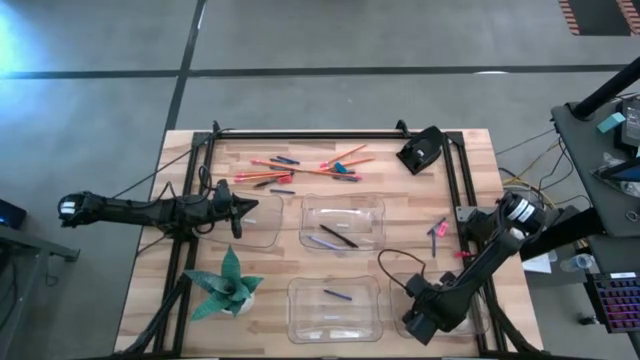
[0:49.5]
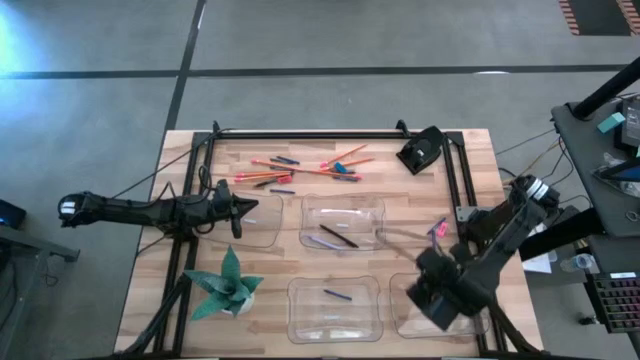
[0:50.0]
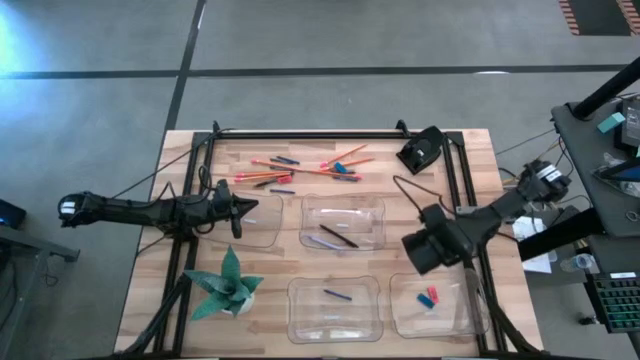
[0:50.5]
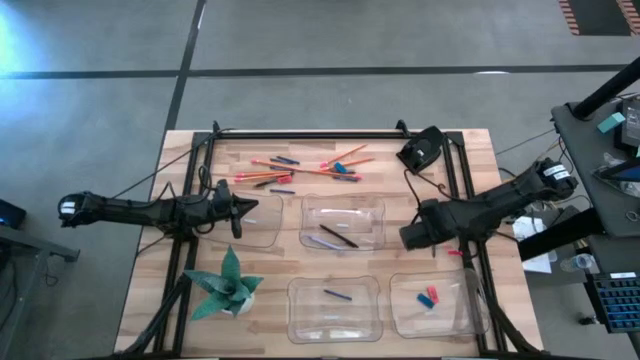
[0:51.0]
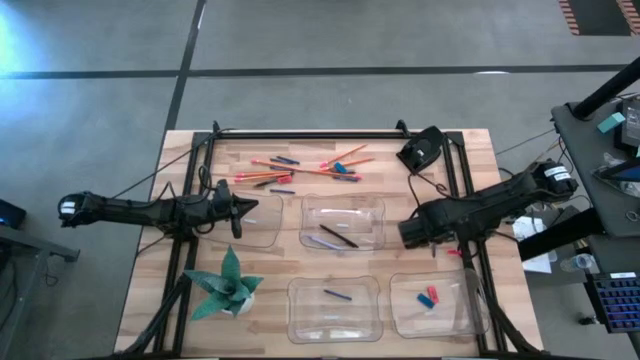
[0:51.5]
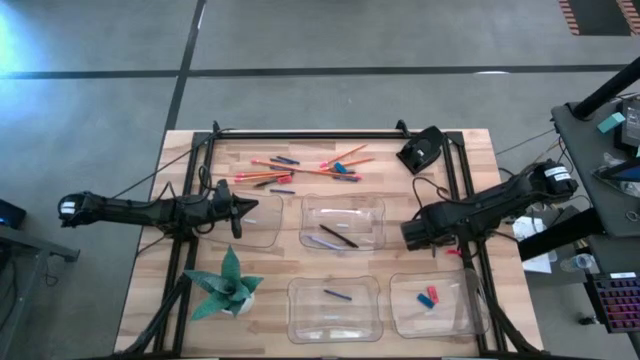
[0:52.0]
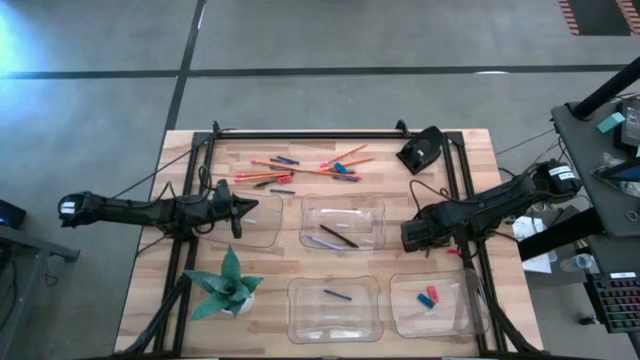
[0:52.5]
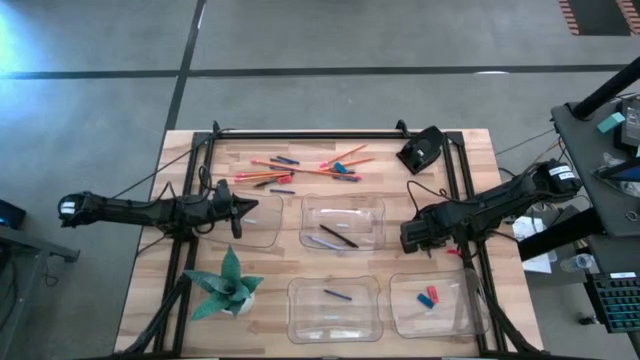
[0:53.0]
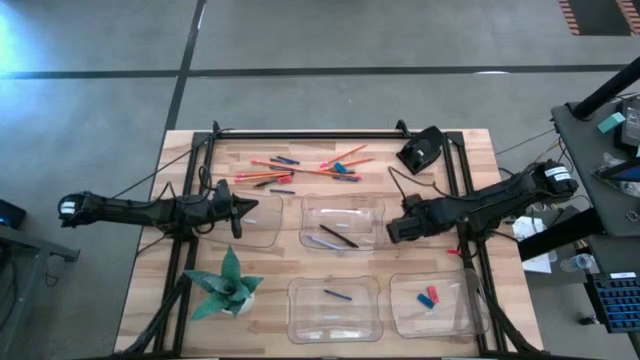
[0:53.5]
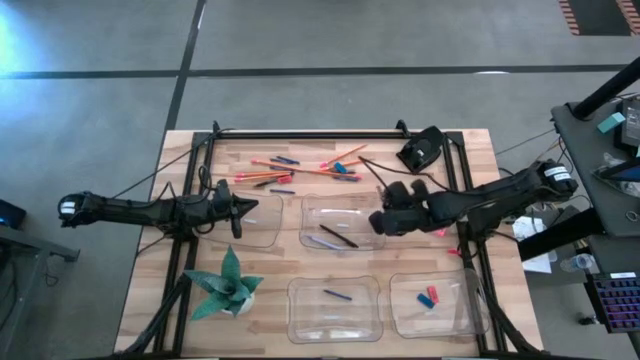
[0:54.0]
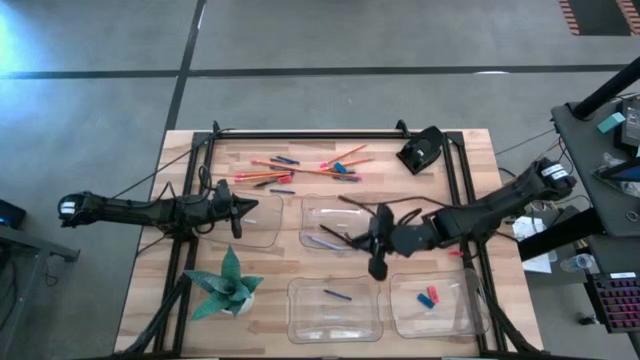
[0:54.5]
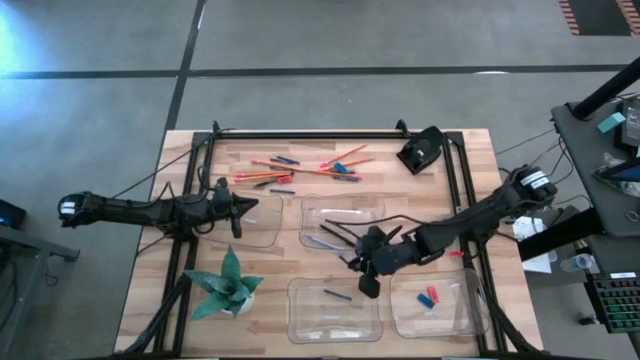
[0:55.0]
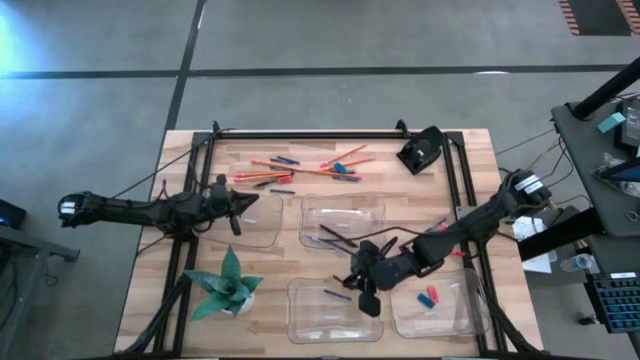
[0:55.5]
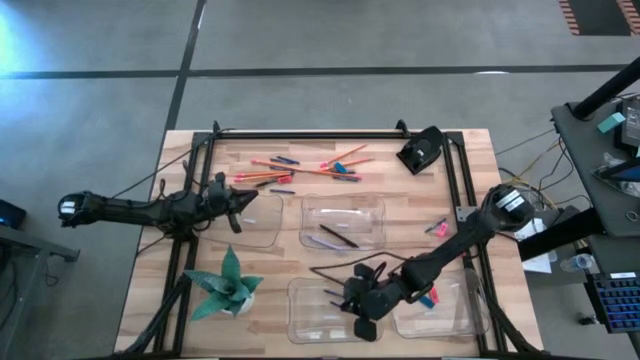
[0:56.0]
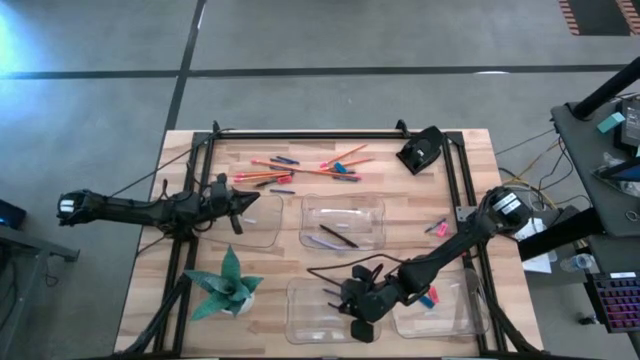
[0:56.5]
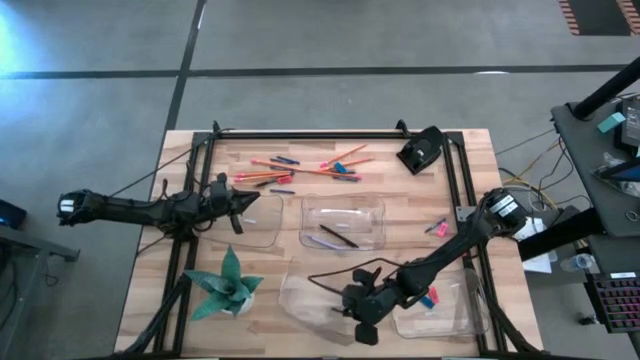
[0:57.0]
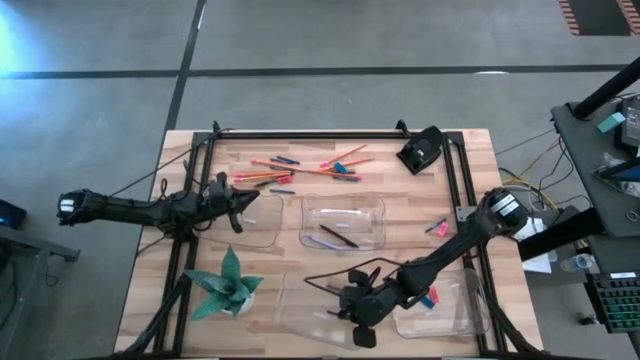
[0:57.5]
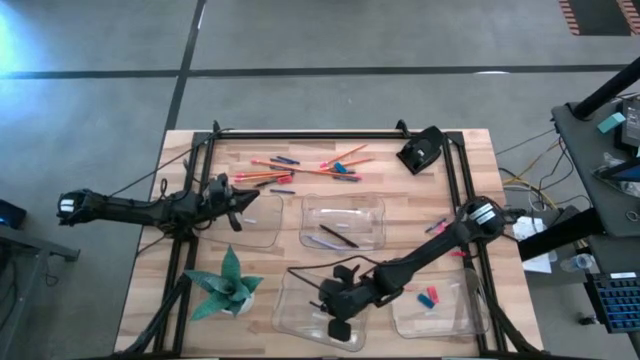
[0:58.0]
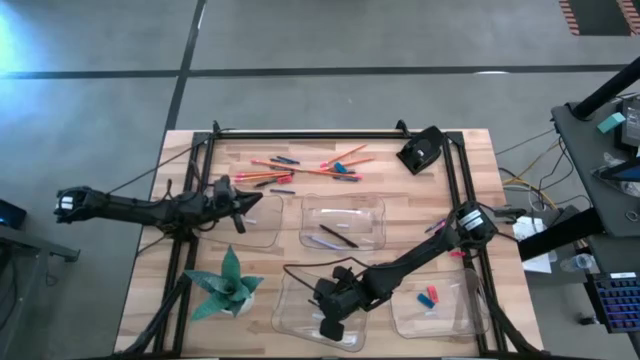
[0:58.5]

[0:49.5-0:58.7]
Task: Sort crayons/erasers/pens/pencils in bins
Put the blue crayon into the bottom left transparent bin

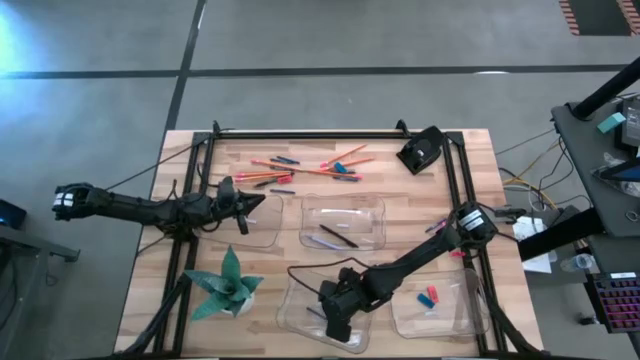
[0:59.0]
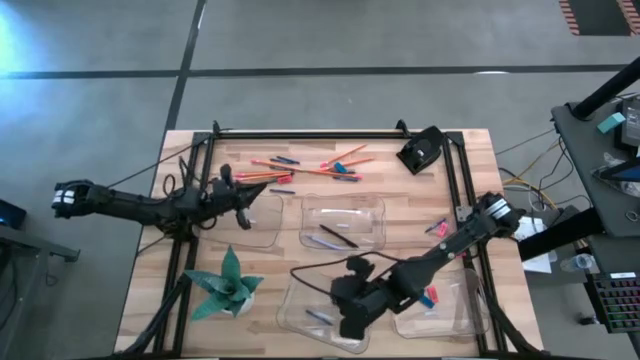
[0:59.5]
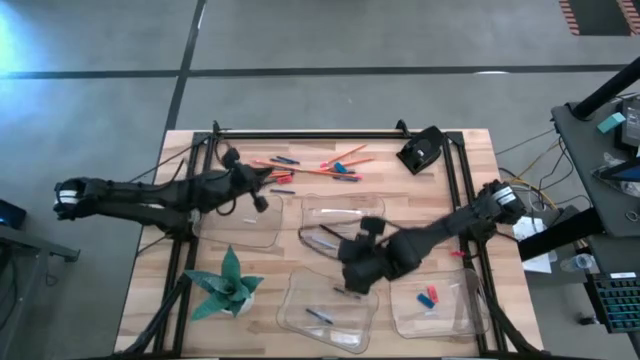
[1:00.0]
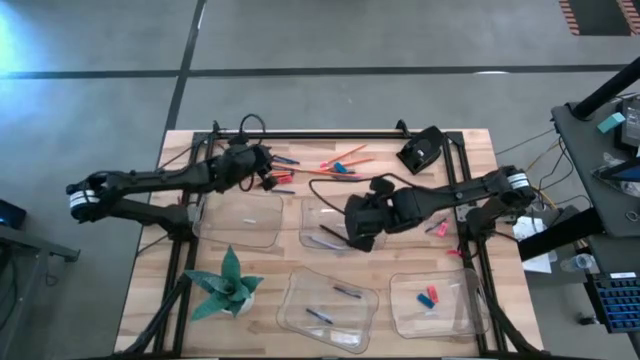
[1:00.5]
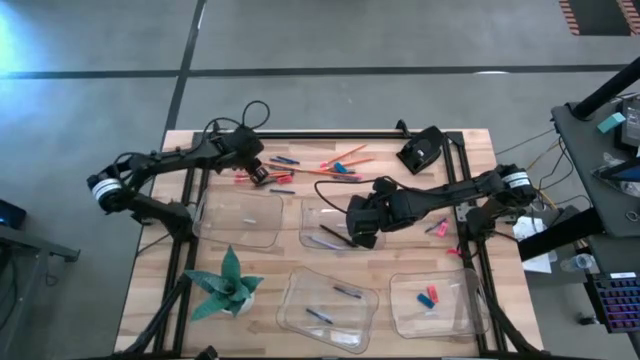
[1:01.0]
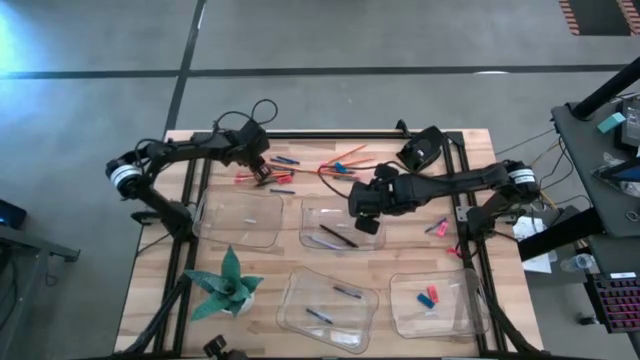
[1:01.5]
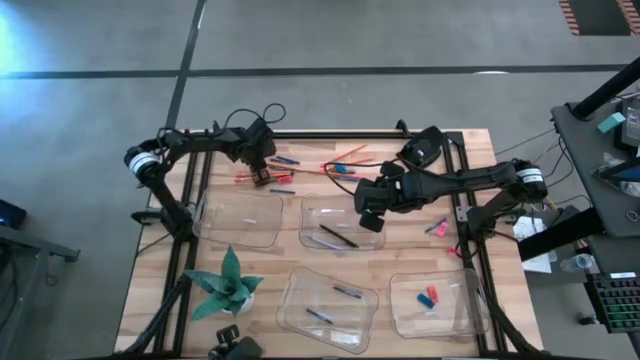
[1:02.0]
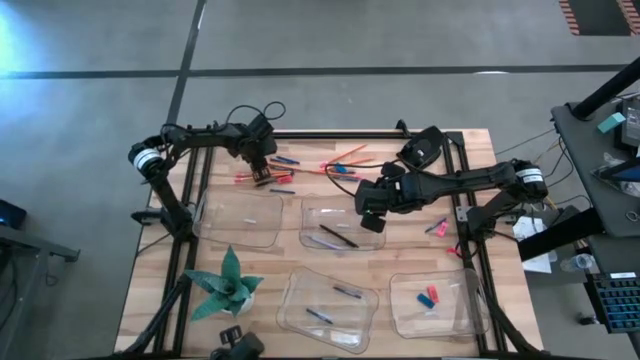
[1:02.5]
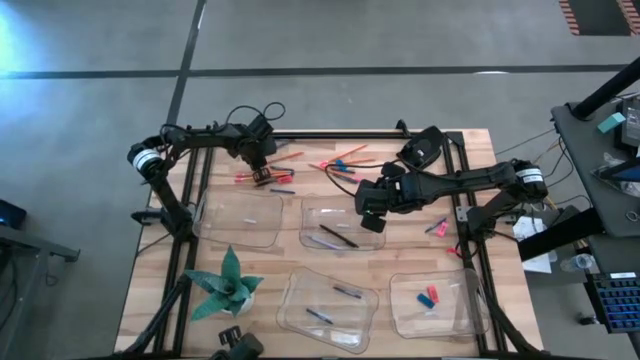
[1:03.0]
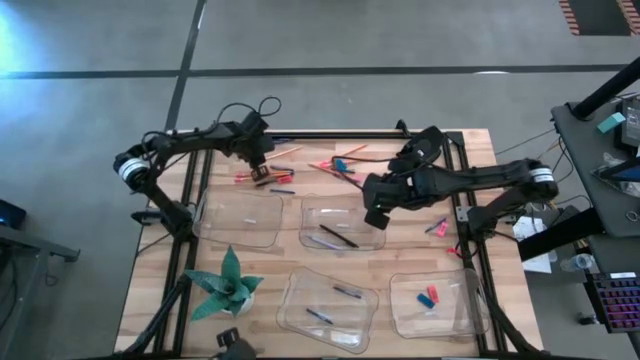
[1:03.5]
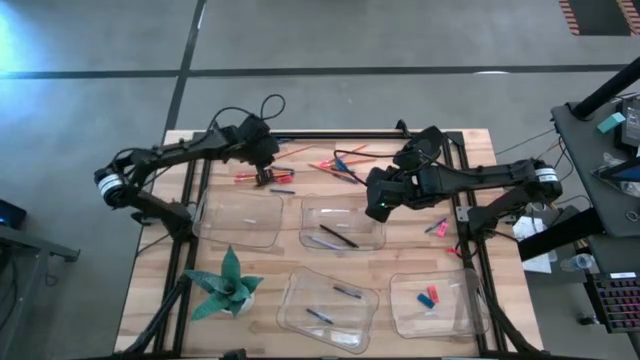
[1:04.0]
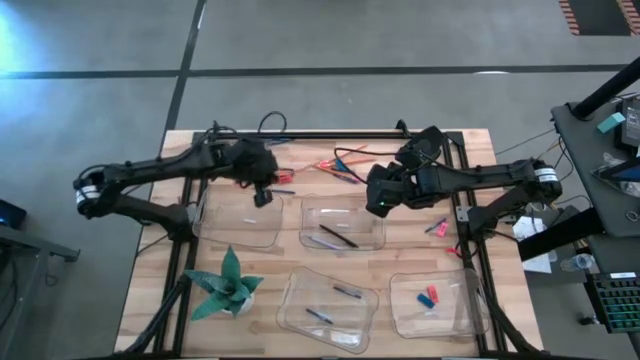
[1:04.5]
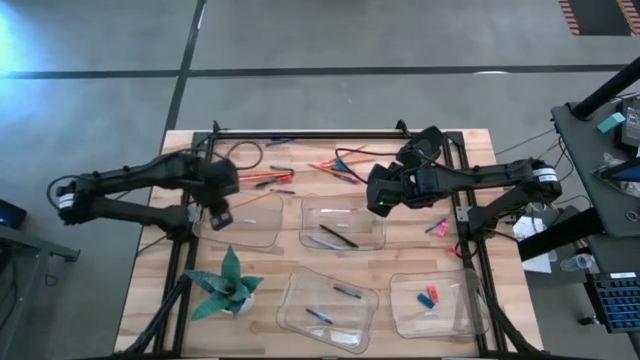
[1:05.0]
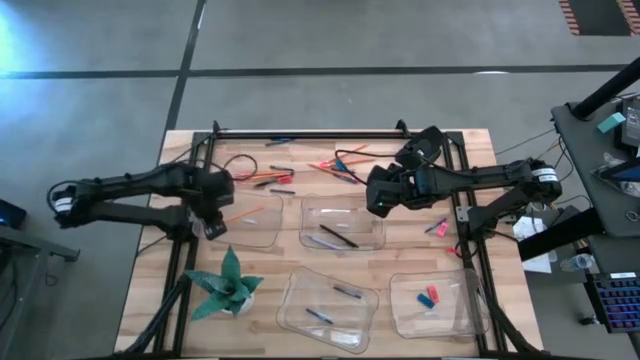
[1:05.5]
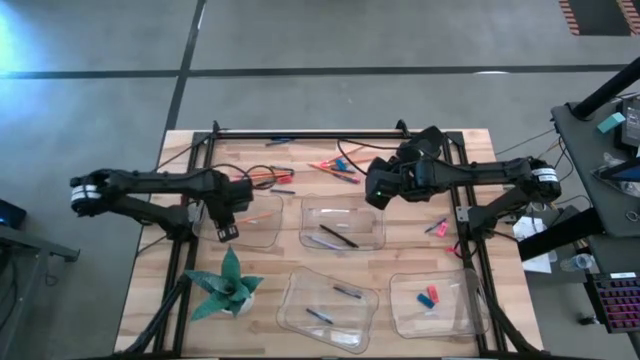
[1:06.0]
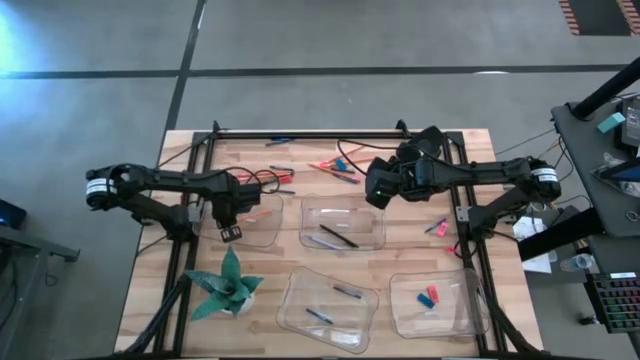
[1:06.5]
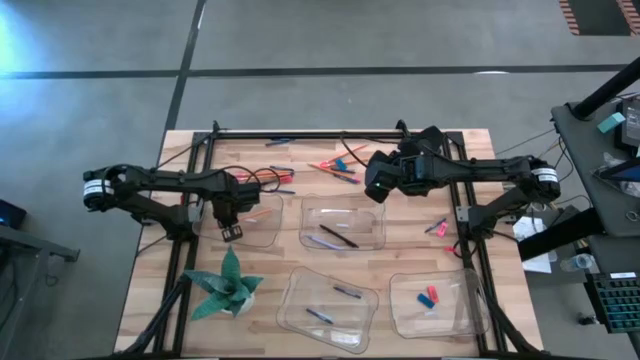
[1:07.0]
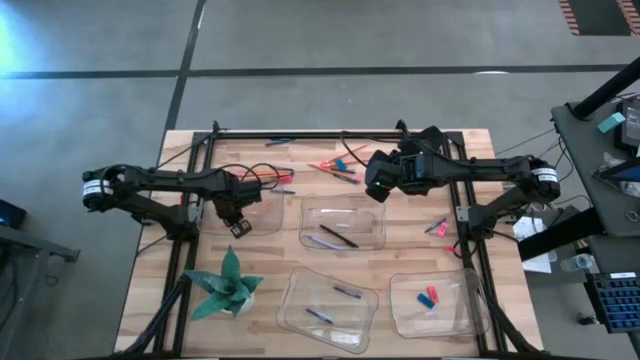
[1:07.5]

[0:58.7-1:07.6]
Put the orange pencil into the top left transparent bin

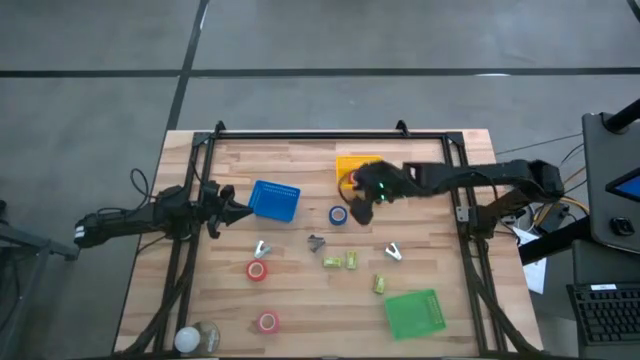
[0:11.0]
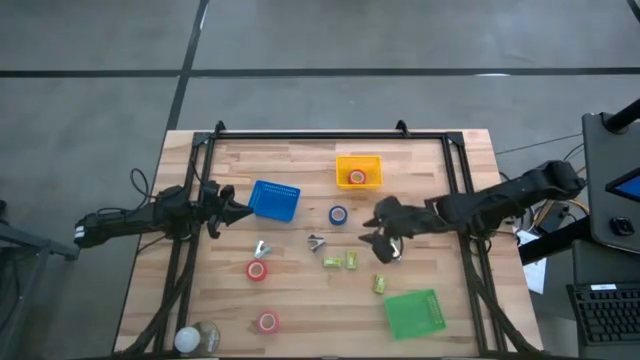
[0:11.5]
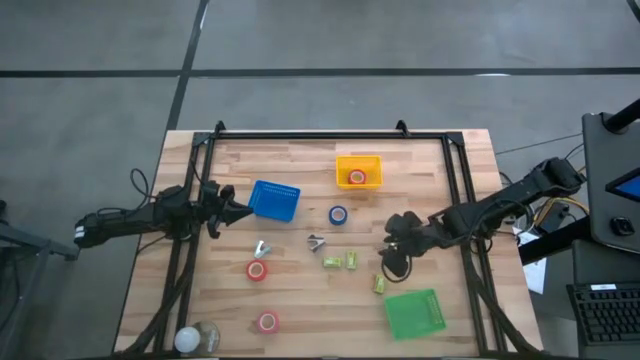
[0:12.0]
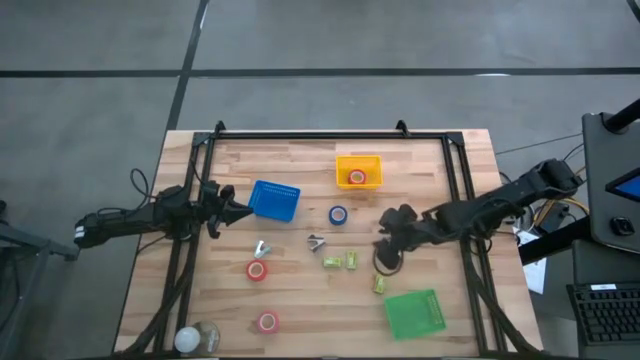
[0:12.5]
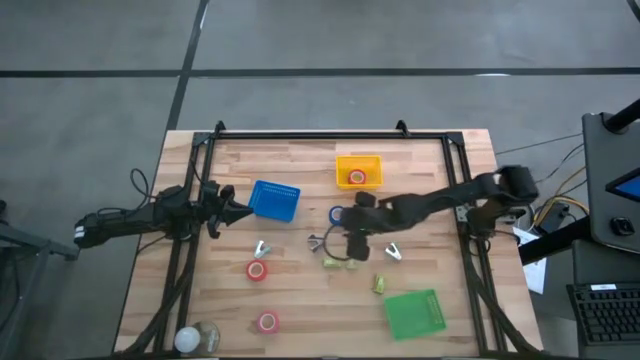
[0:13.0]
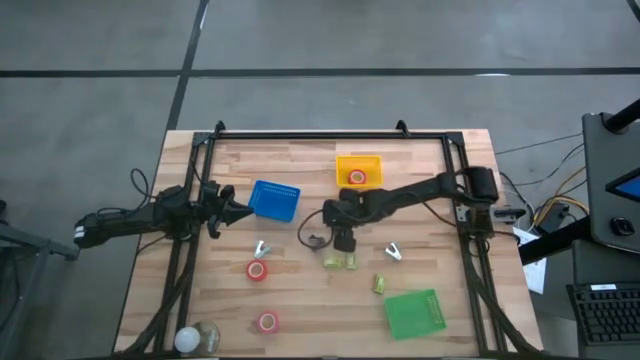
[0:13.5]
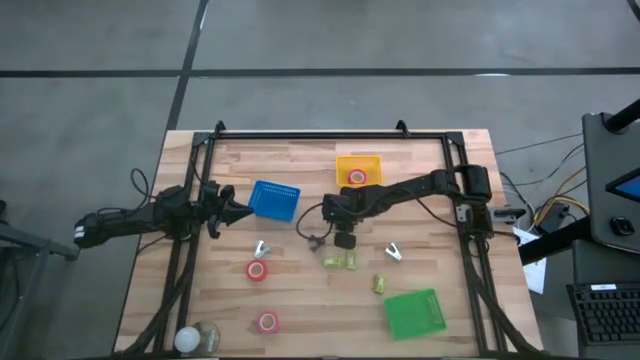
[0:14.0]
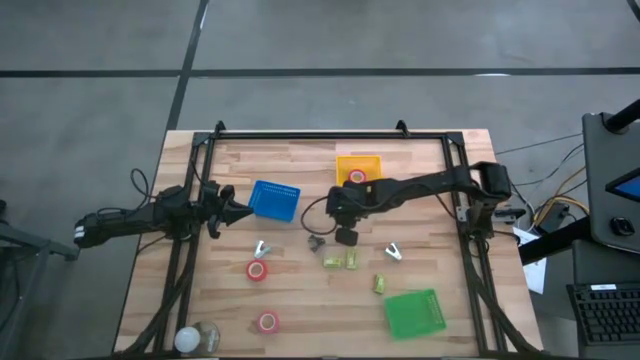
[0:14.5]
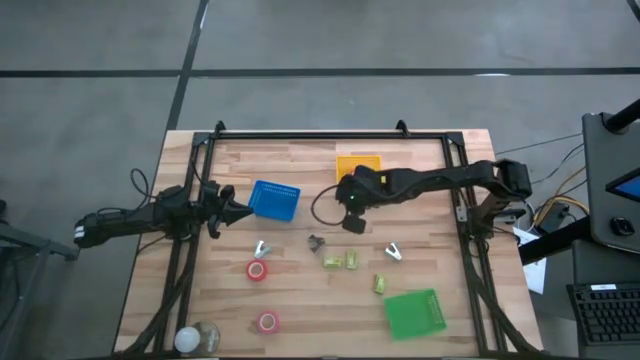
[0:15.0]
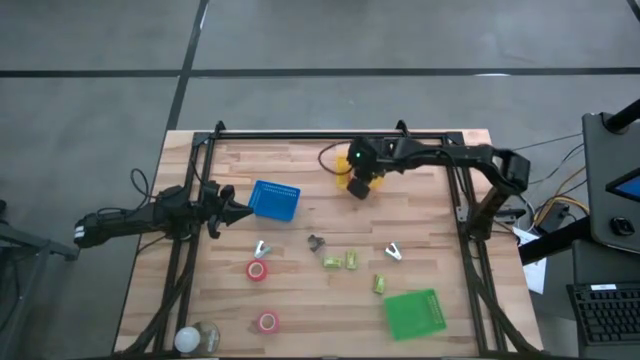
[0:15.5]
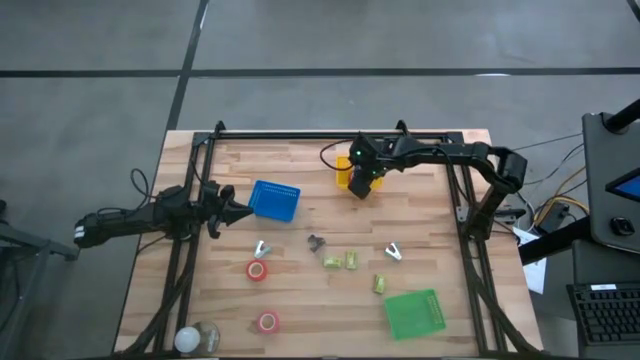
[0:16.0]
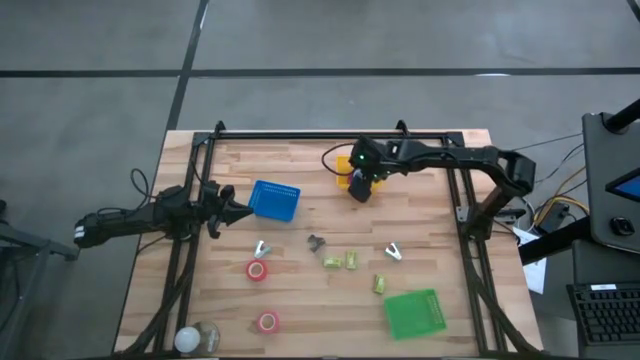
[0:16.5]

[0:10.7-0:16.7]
Task: Pick and place Stapler, Stapler remover, tape
Put the blue tape into the yellow bin
